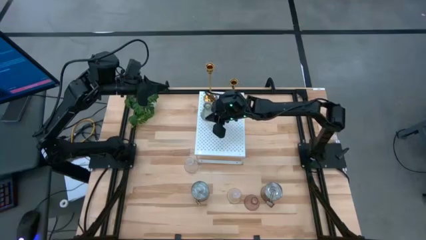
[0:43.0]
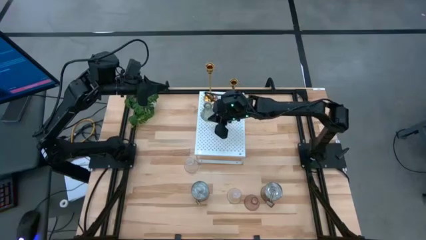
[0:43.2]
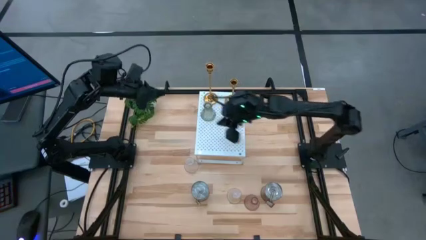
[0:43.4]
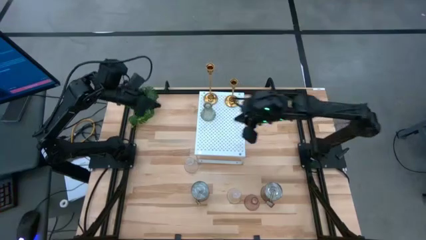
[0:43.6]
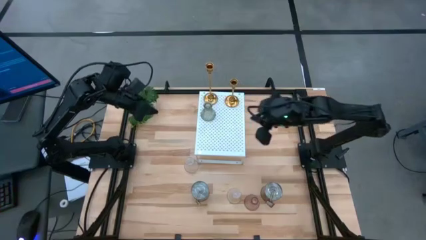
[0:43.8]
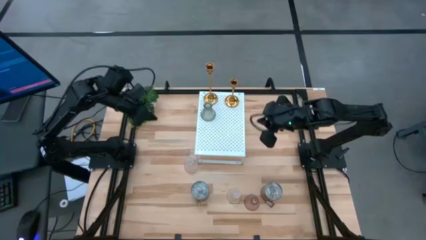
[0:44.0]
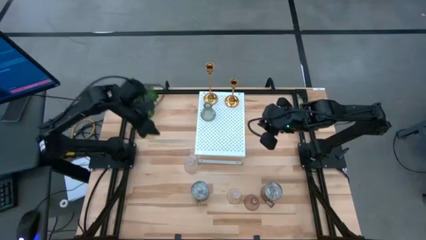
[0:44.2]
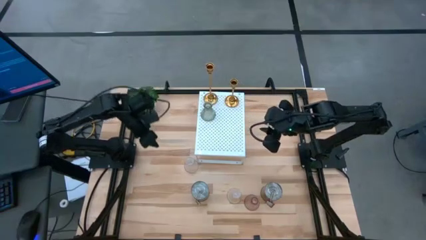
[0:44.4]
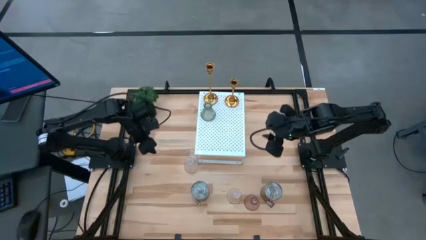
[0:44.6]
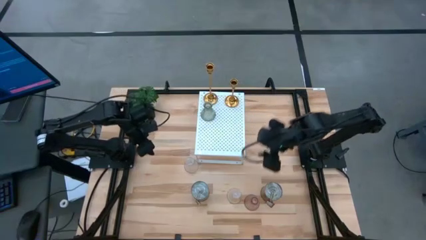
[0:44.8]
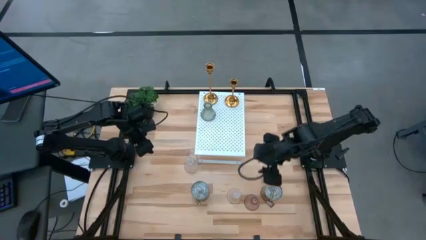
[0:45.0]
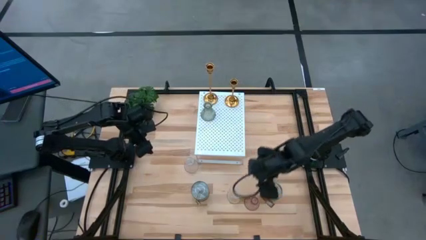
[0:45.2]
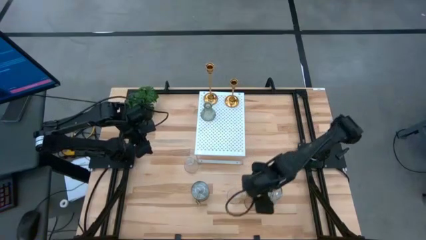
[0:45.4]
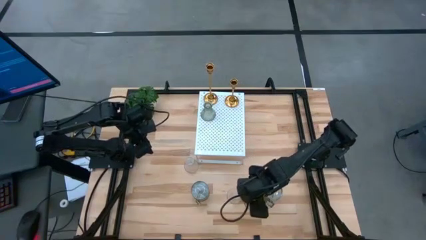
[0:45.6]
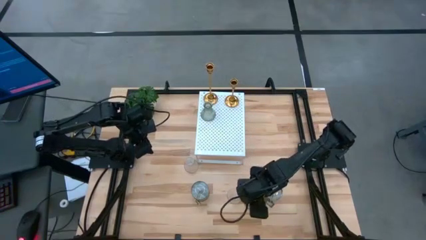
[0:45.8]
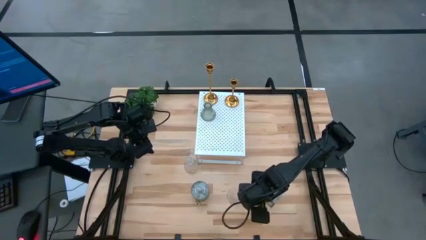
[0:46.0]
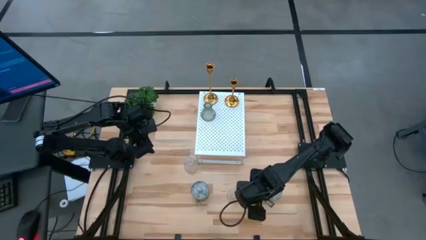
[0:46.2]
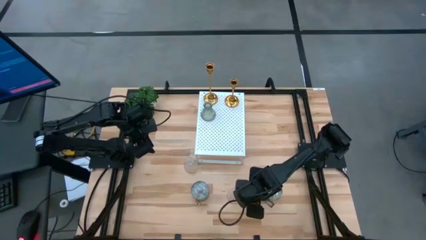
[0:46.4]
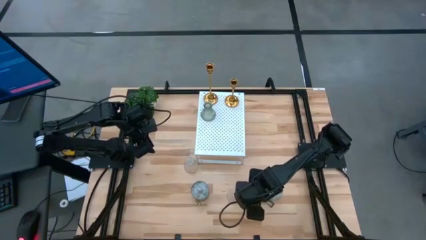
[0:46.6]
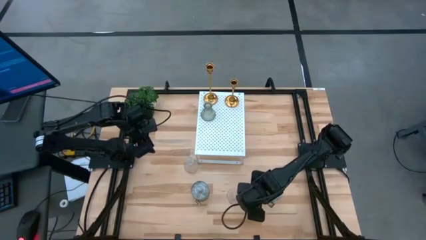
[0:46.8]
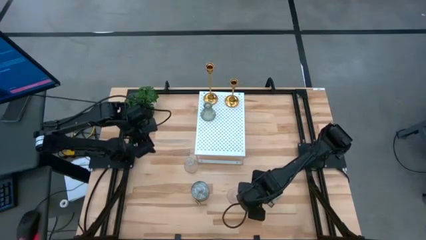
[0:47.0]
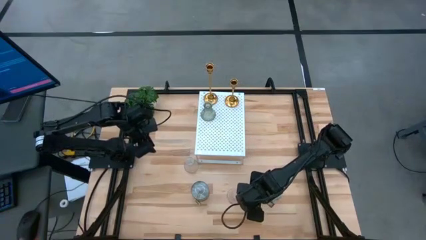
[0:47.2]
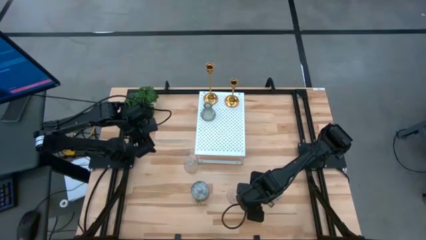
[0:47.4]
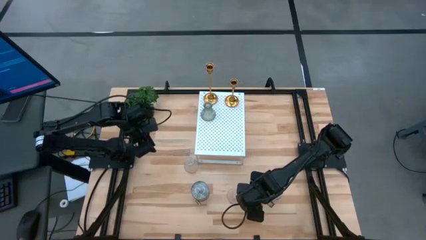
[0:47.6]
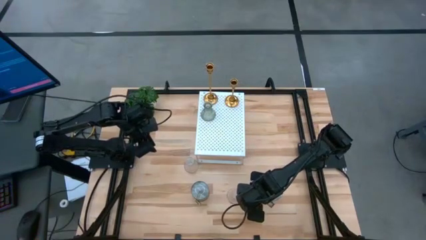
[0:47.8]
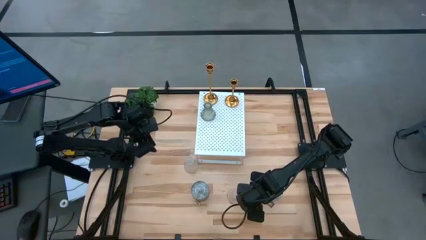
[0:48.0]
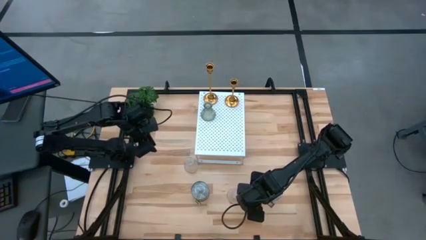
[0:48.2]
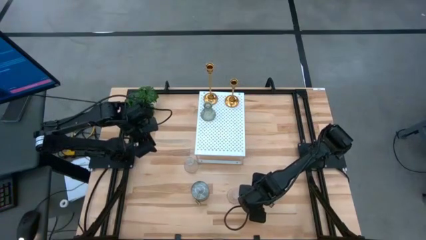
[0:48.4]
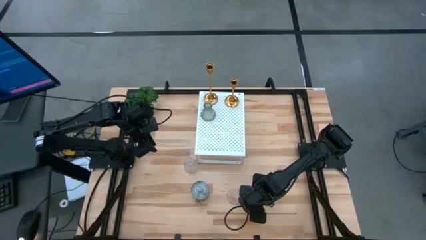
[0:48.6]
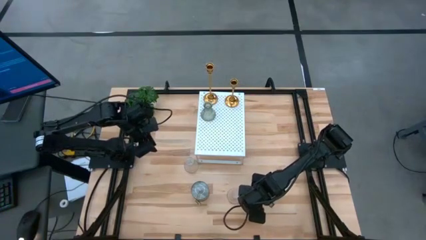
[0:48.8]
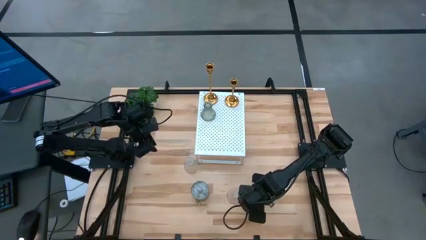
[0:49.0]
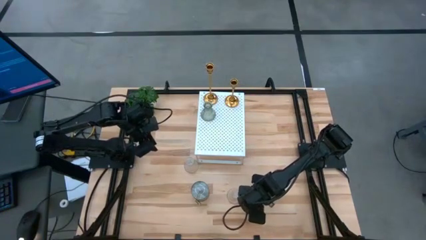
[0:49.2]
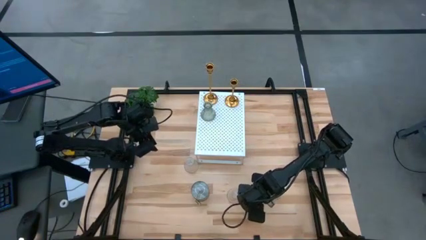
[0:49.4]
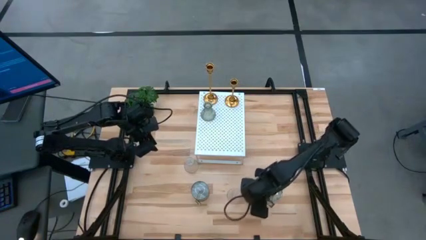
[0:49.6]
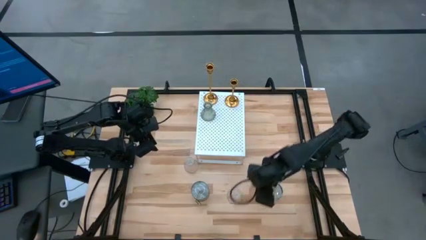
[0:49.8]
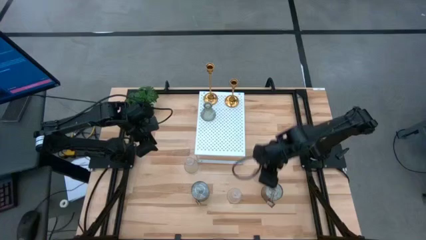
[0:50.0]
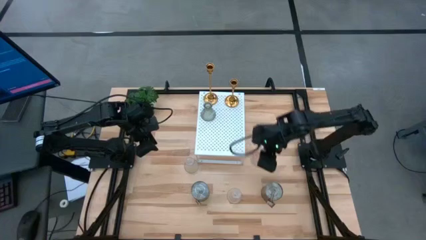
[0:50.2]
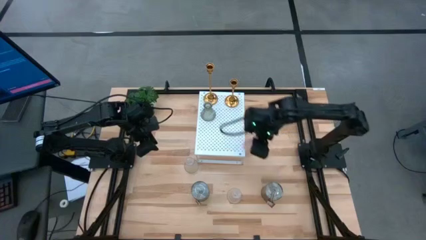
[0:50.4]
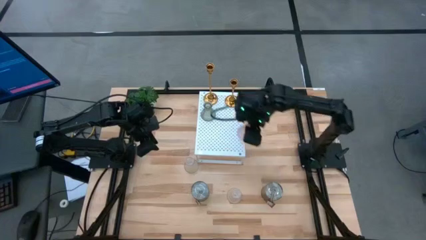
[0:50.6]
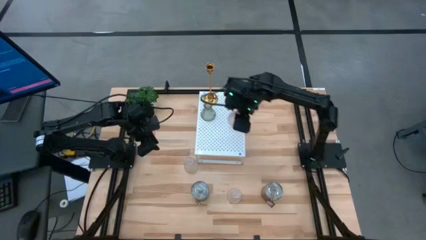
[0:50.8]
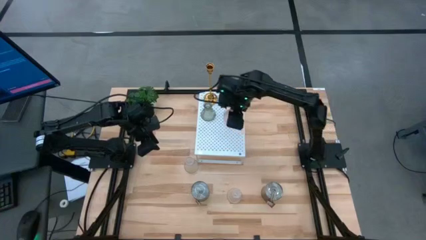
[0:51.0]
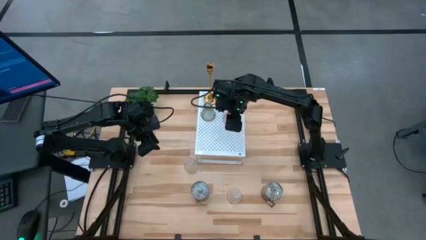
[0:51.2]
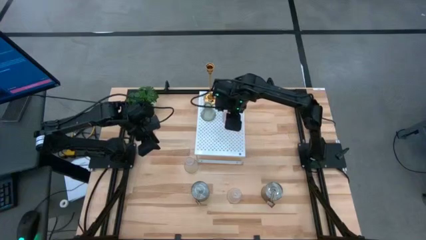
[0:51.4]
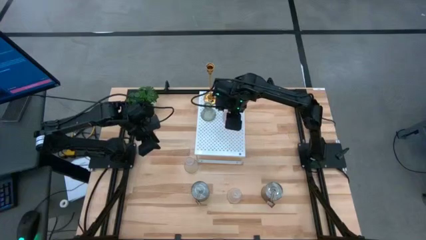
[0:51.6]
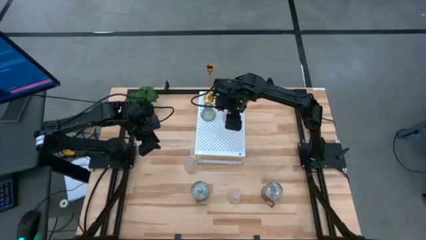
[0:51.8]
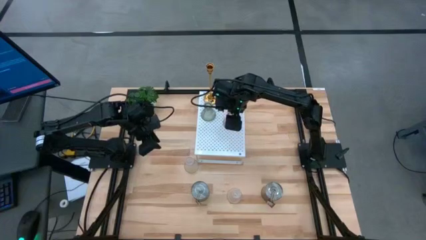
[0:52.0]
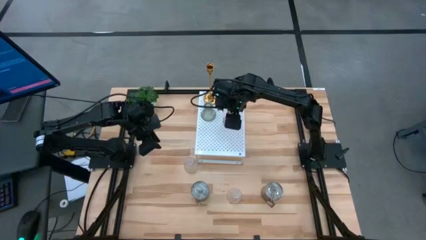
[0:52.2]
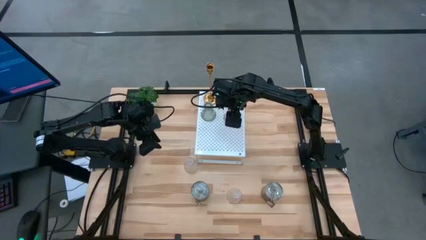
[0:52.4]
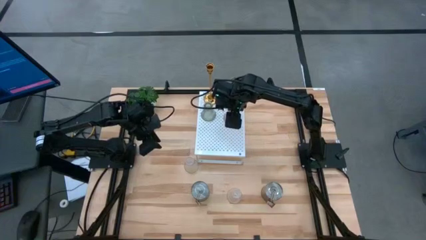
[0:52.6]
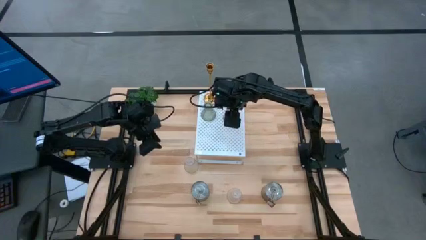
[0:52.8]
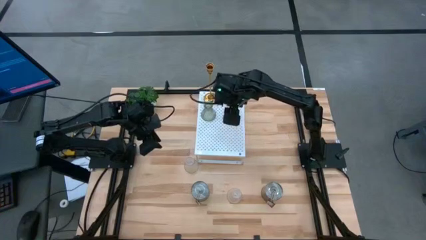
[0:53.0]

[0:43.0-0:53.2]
Task: Pick & Place candle stick holders
Put the pink glass candle holder on the shelf

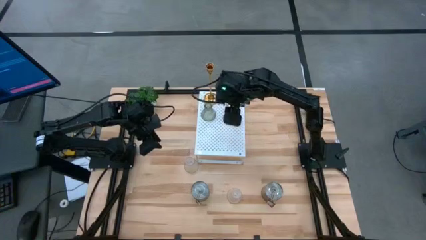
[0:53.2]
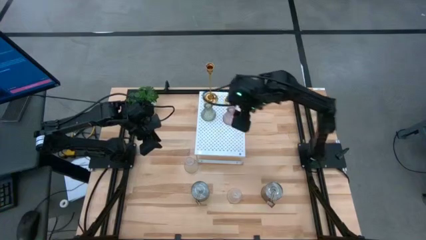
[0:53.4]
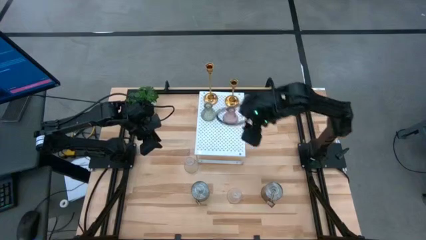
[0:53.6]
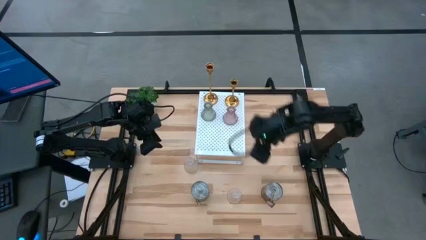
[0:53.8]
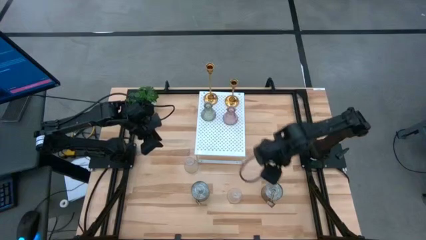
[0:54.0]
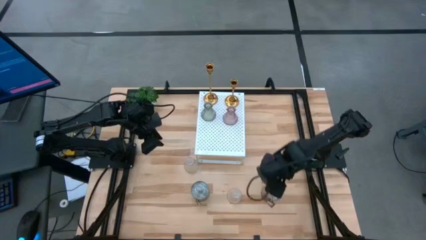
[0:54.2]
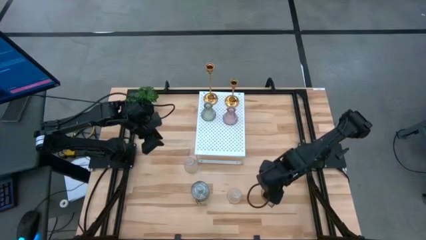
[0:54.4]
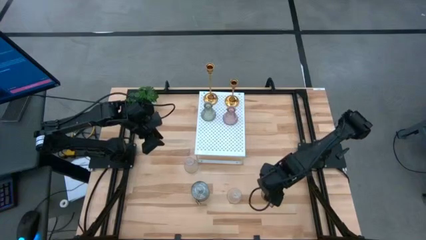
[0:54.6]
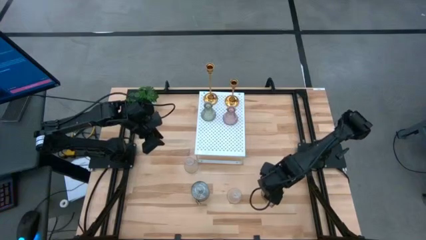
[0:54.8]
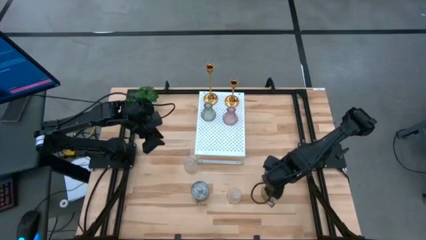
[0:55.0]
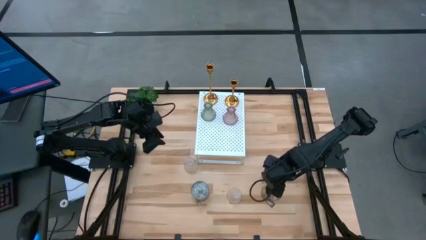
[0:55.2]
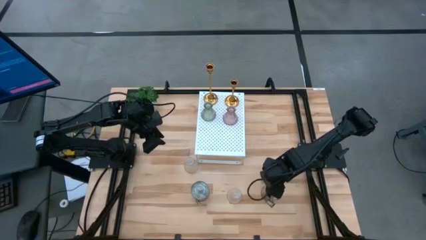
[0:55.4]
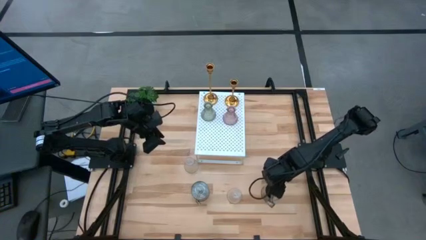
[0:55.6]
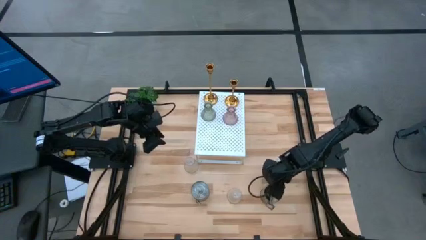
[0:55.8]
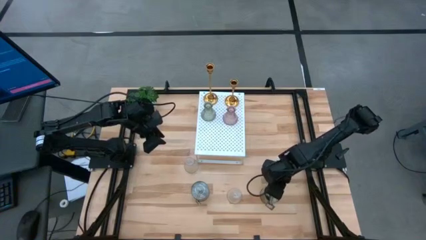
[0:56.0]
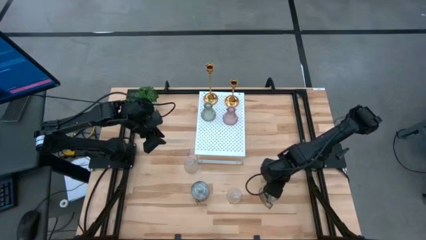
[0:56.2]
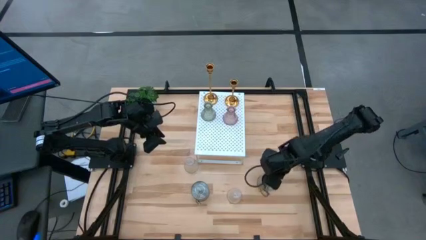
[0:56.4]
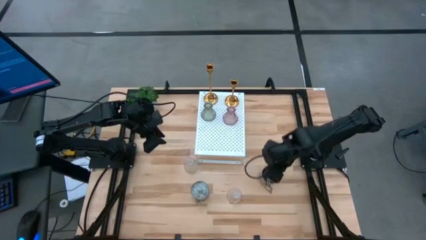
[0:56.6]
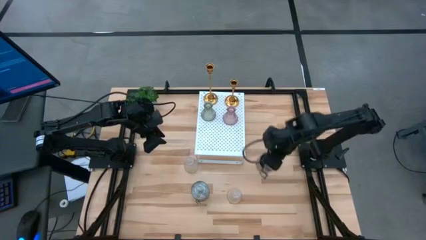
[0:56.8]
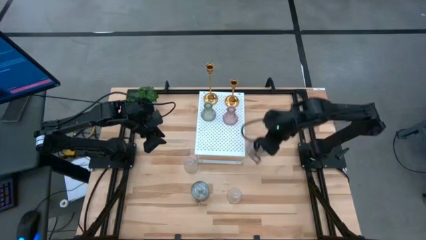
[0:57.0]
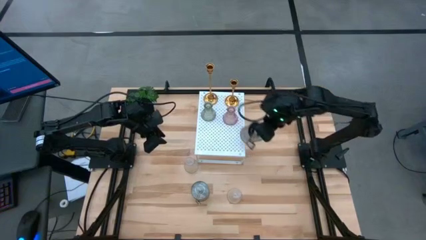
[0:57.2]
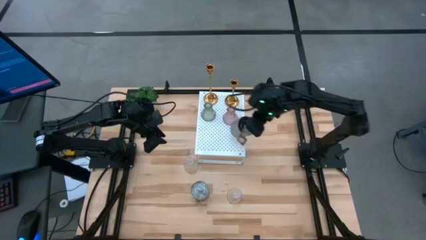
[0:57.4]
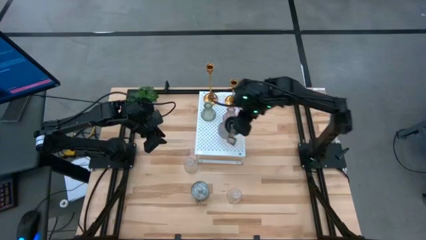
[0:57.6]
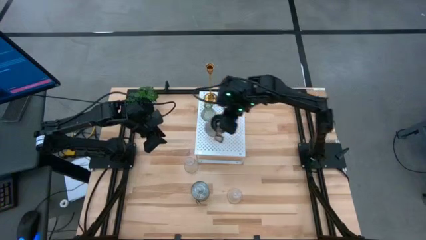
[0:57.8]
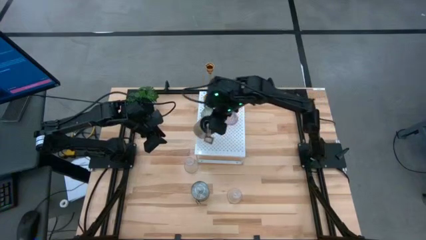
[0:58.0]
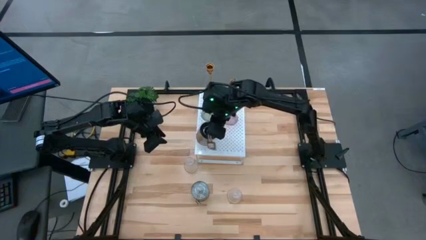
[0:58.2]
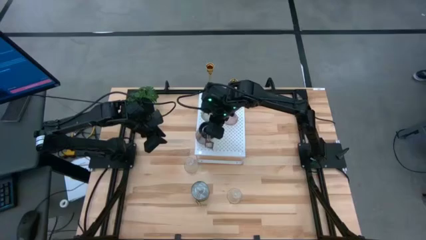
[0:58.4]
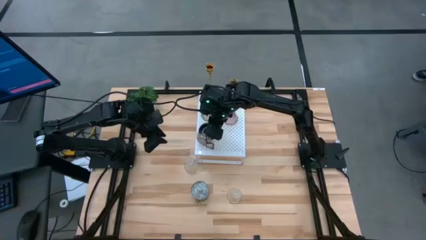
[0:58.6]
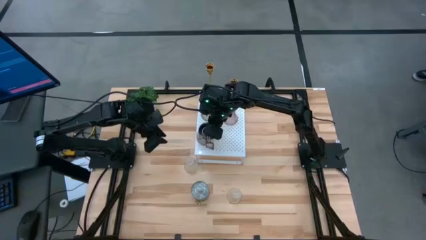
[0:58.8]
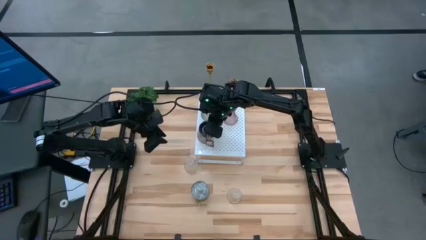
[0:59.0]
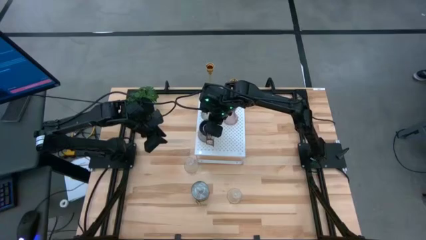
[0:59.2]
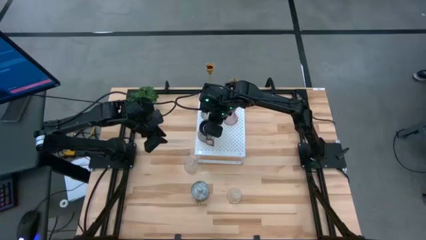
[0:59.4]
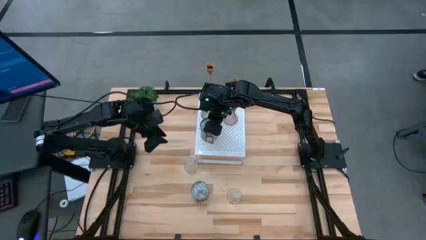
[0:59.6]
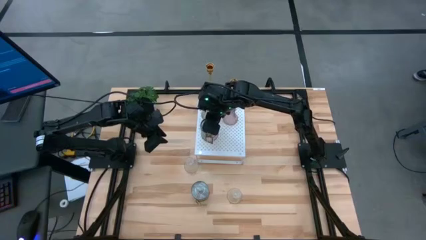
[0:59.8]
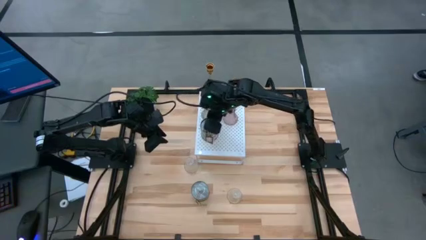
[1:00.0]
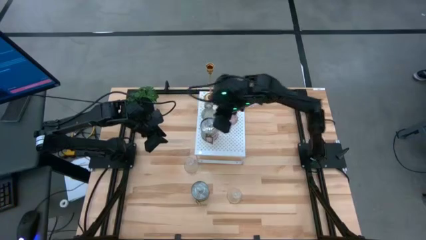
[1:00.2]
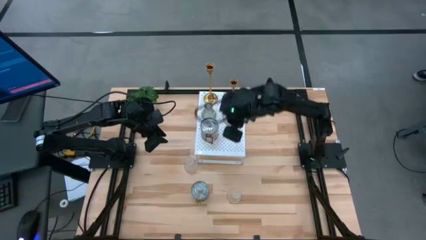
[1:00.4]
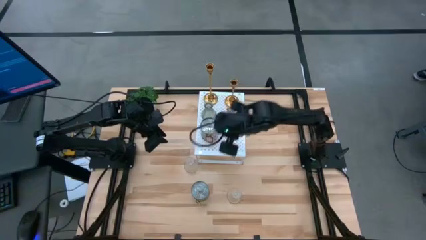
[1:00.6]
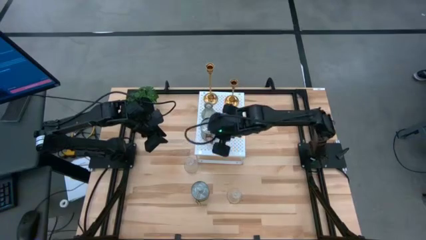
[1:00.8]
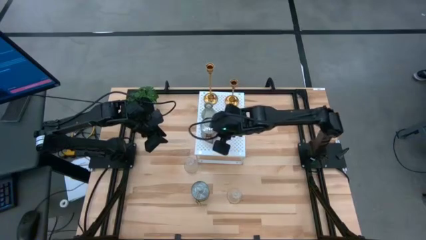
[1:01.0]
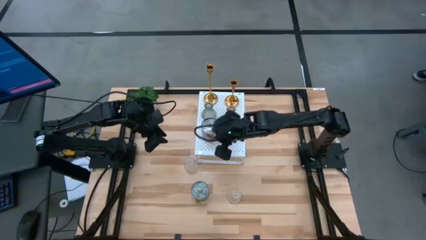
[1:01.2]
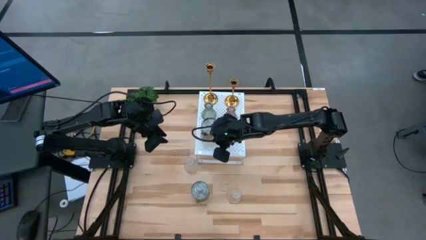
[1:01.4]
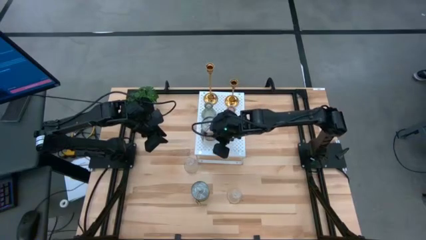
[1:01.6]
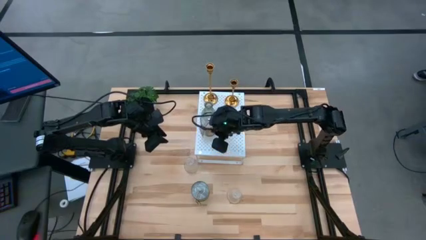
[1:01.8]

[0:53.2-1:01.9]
Put the right silver scented candle on the shelf
